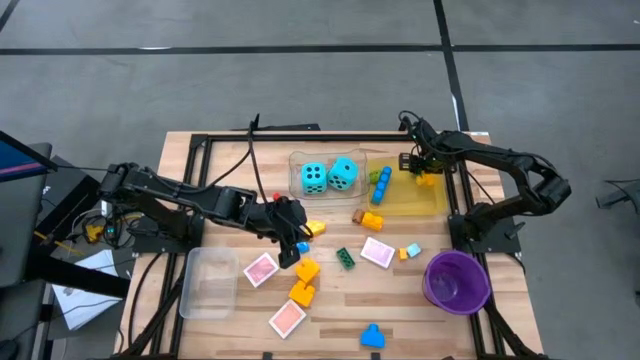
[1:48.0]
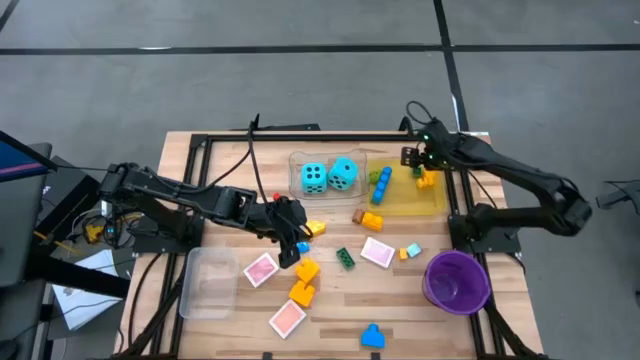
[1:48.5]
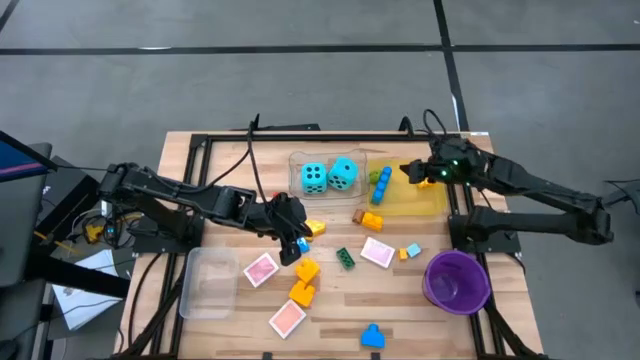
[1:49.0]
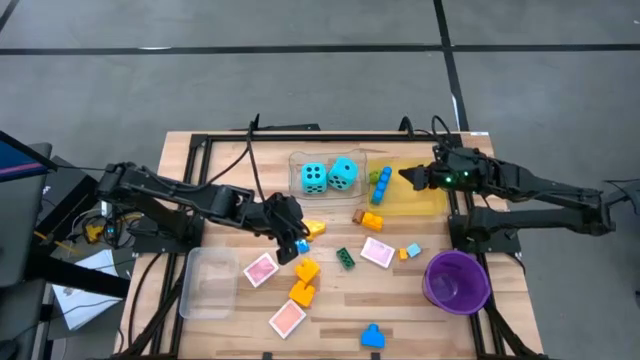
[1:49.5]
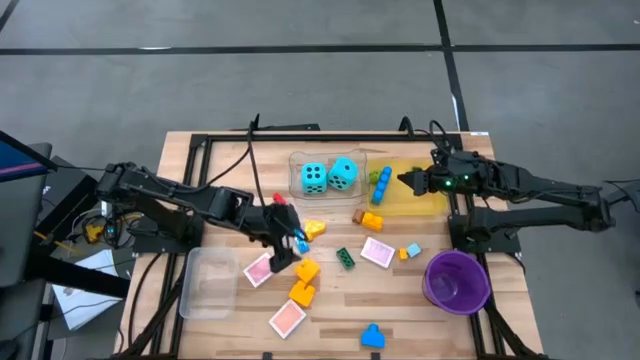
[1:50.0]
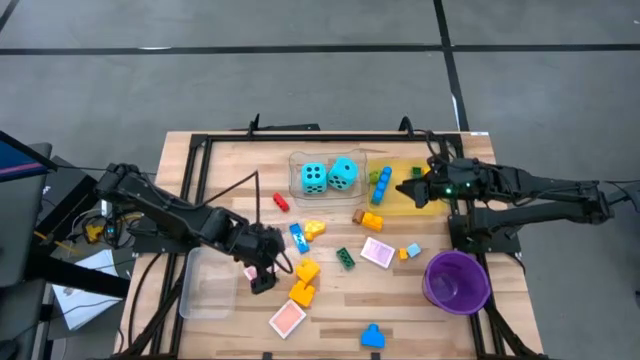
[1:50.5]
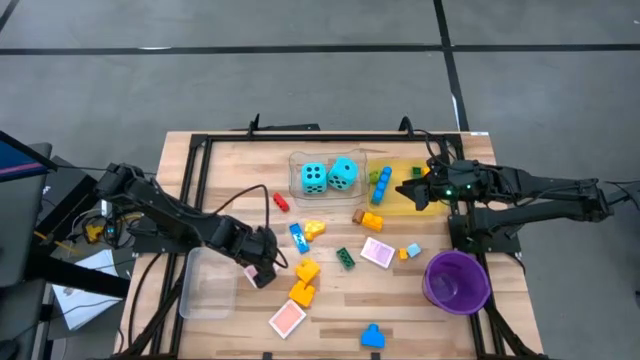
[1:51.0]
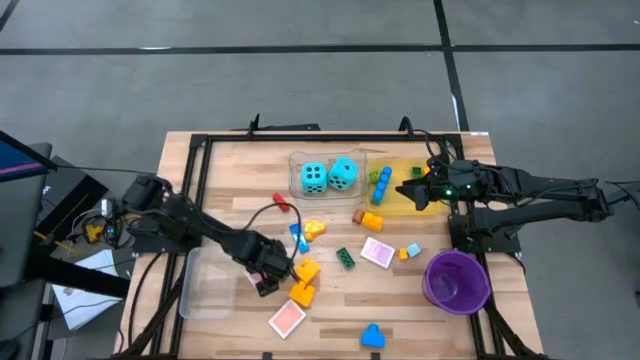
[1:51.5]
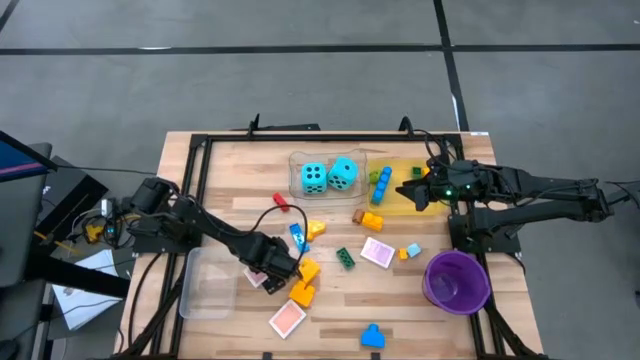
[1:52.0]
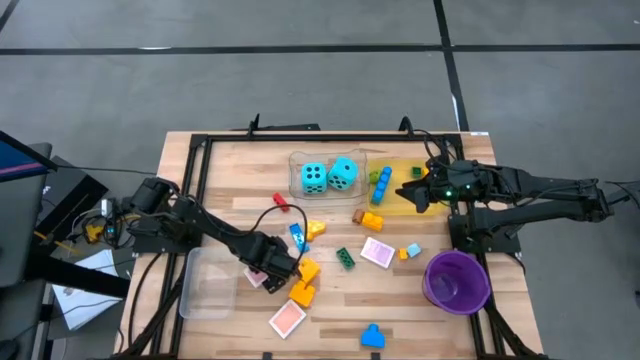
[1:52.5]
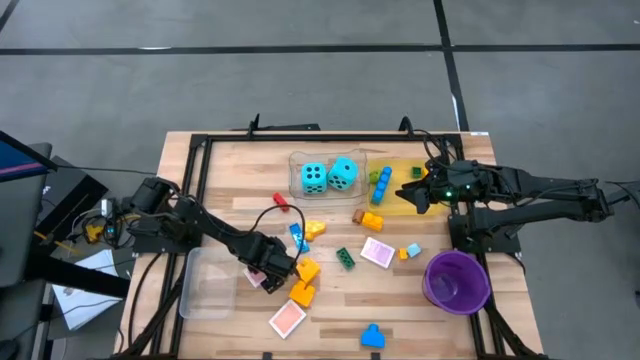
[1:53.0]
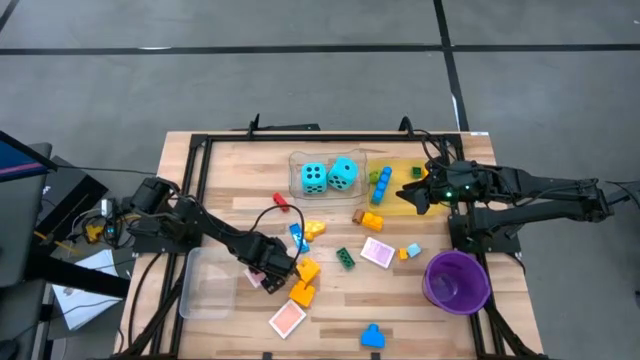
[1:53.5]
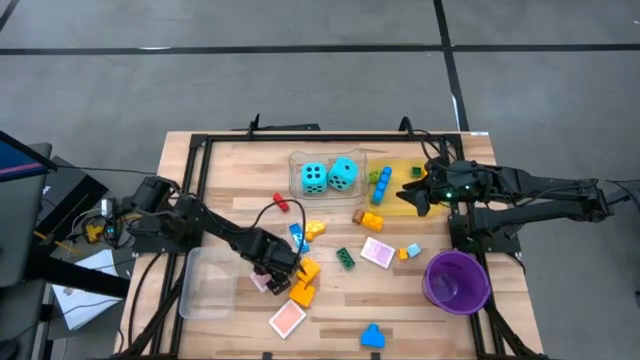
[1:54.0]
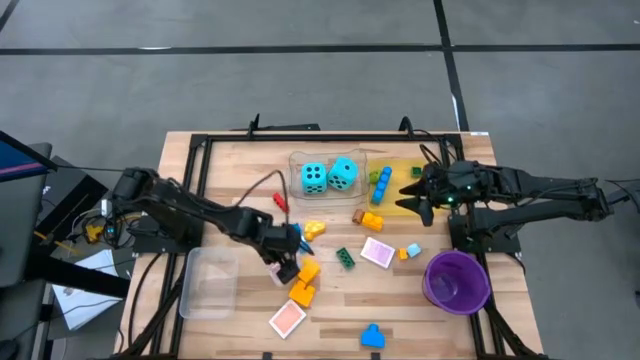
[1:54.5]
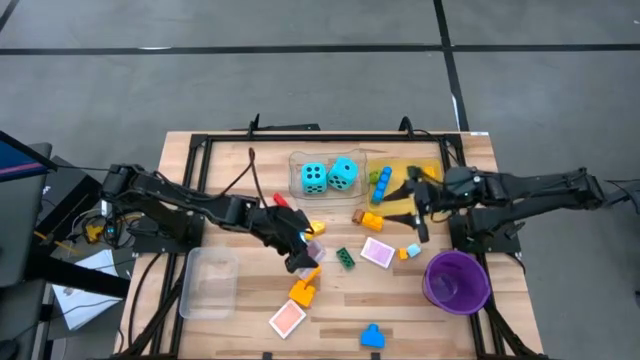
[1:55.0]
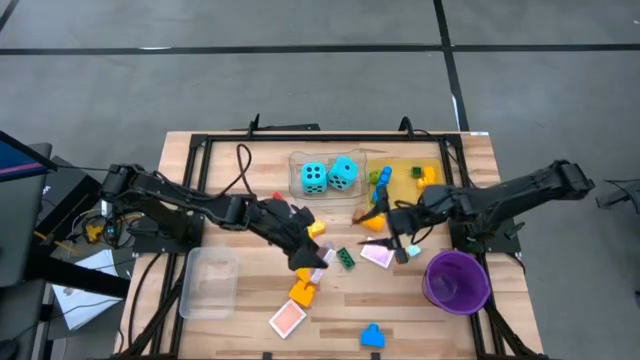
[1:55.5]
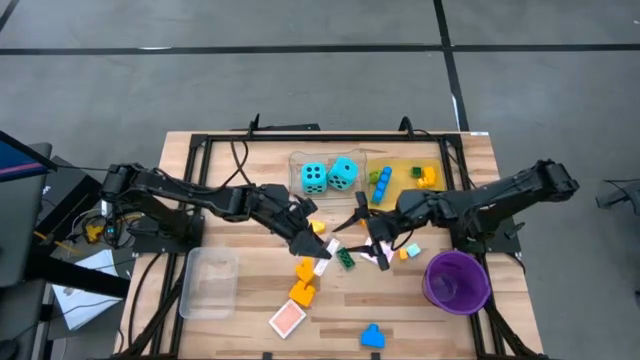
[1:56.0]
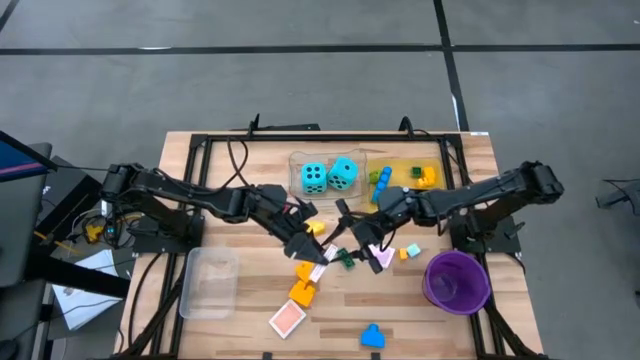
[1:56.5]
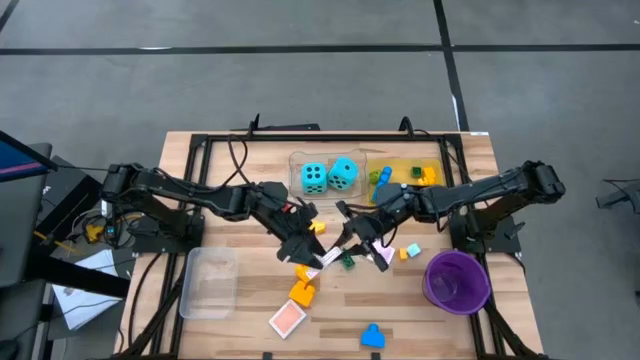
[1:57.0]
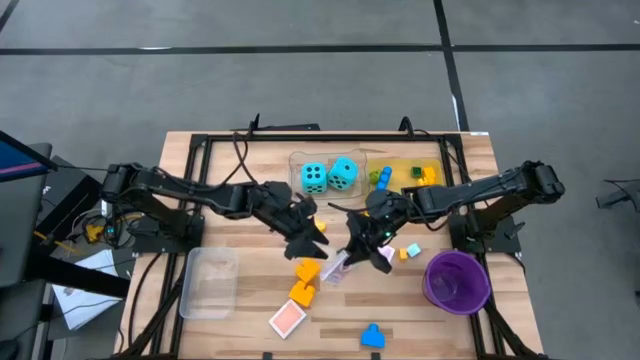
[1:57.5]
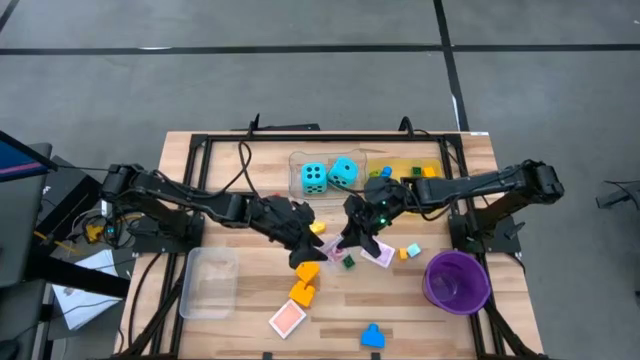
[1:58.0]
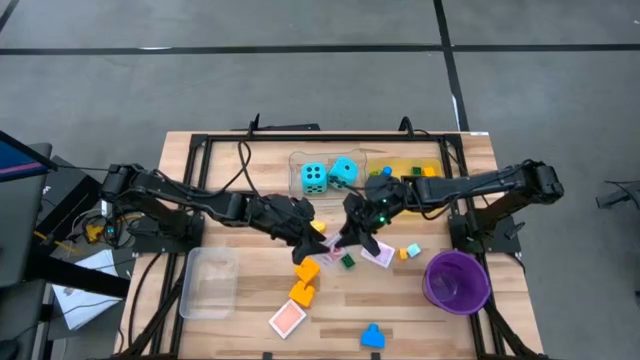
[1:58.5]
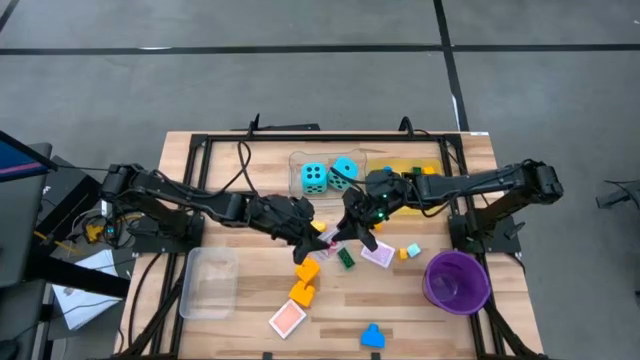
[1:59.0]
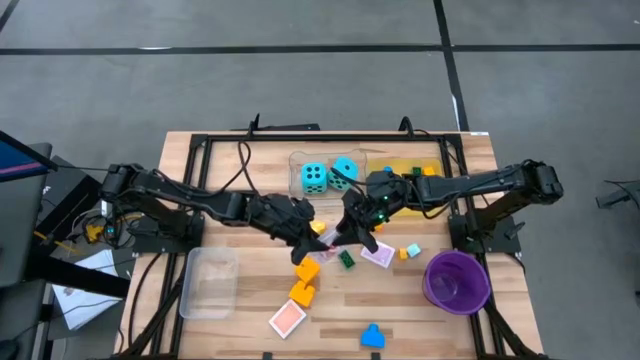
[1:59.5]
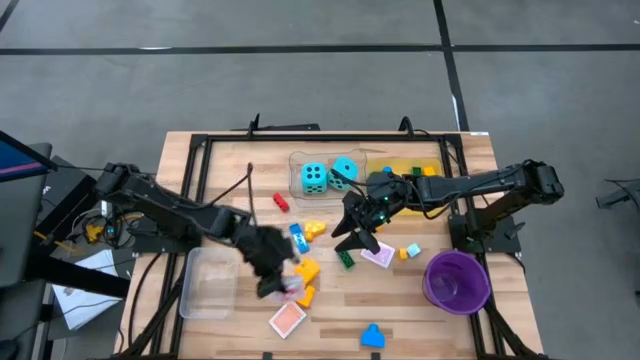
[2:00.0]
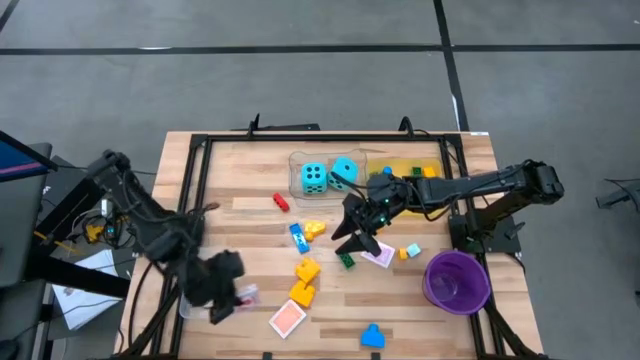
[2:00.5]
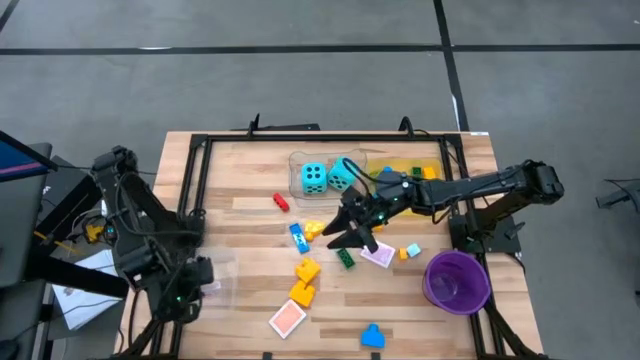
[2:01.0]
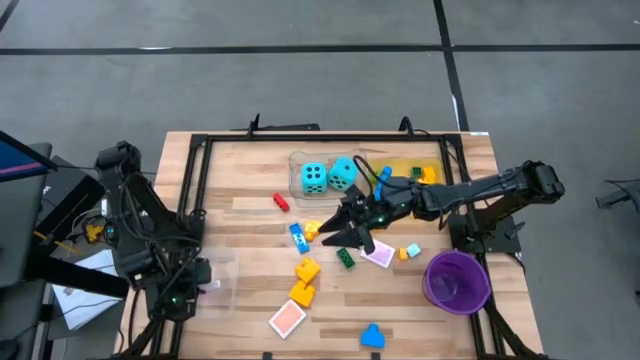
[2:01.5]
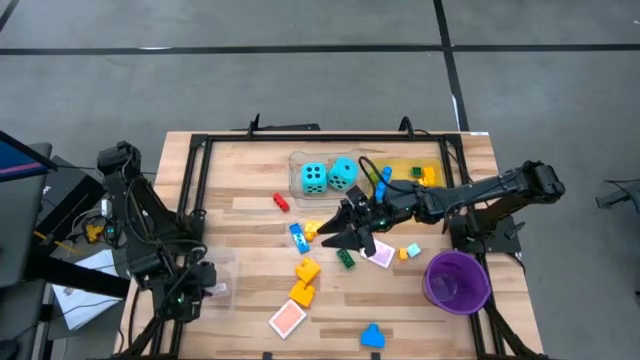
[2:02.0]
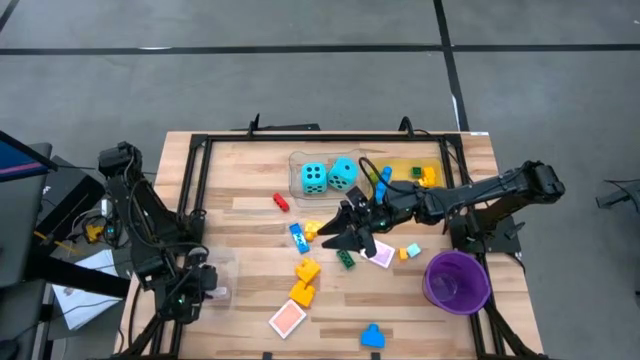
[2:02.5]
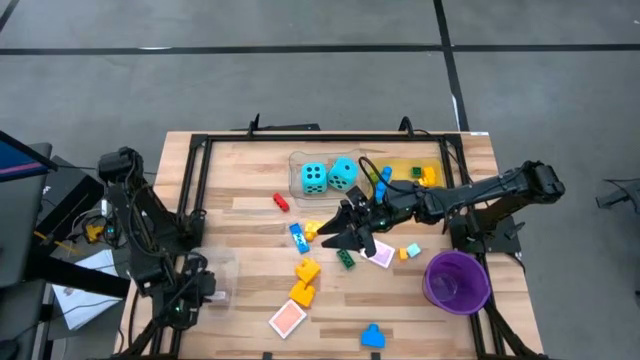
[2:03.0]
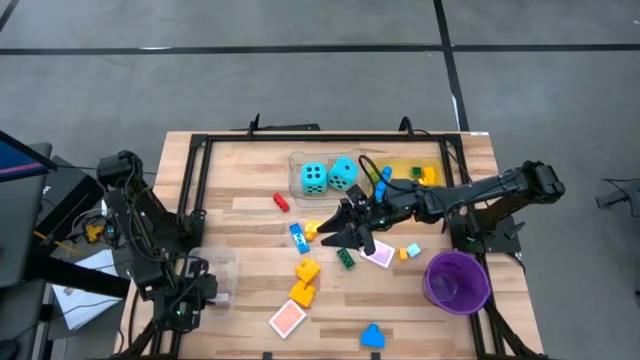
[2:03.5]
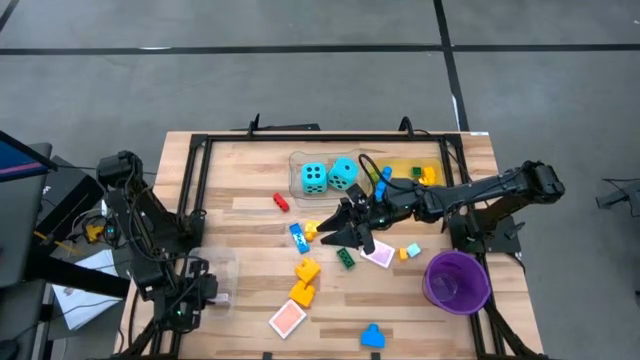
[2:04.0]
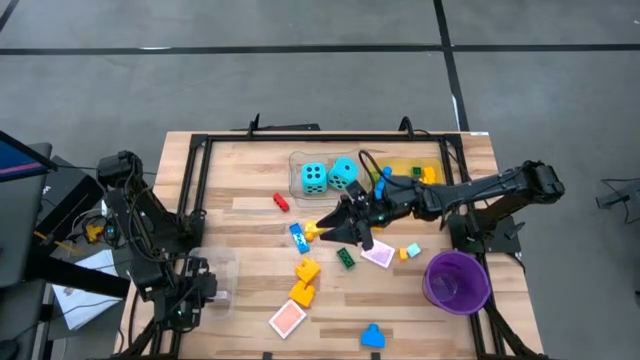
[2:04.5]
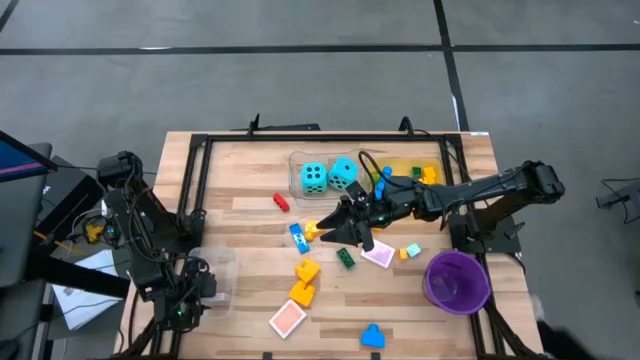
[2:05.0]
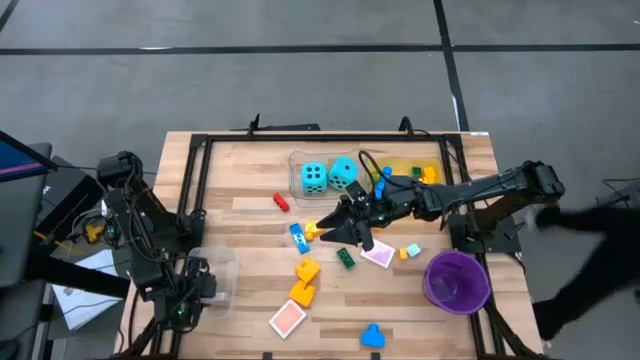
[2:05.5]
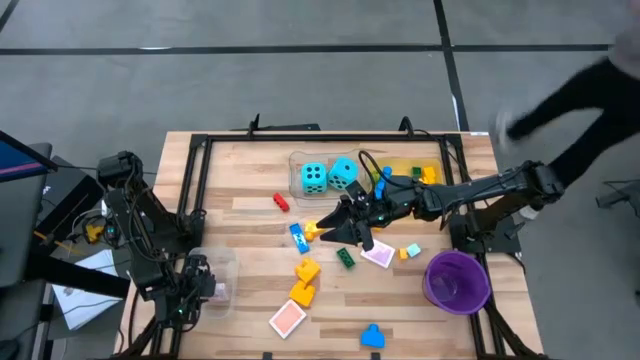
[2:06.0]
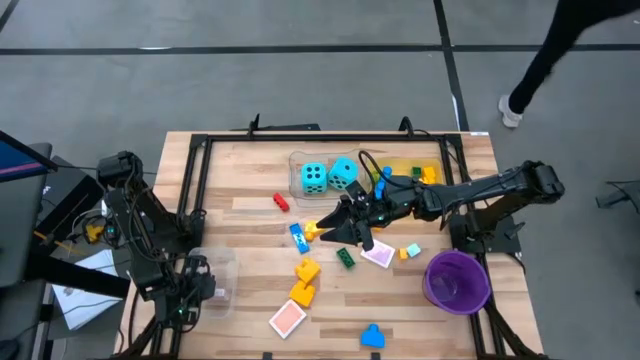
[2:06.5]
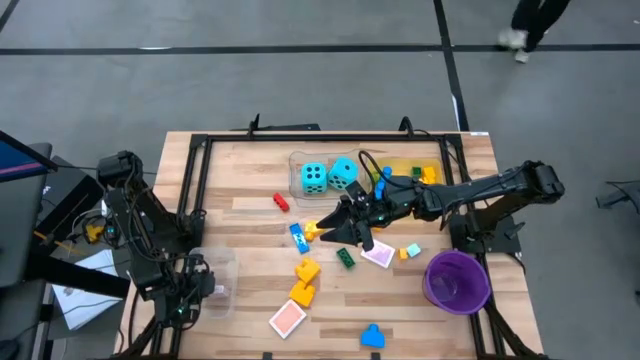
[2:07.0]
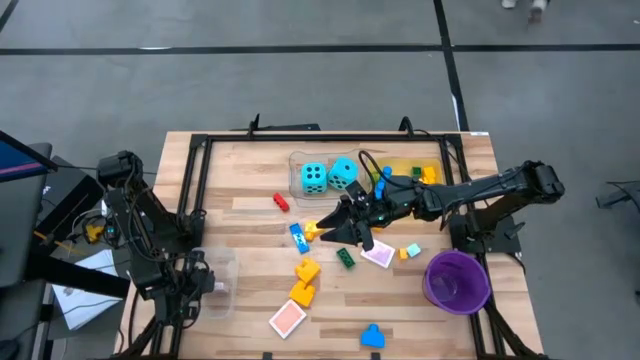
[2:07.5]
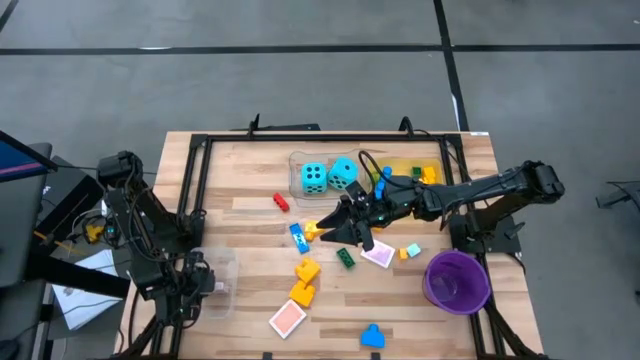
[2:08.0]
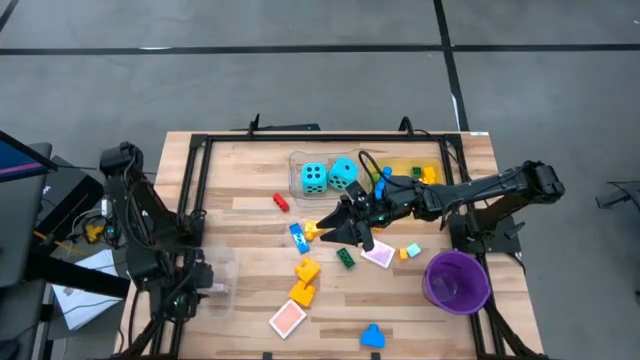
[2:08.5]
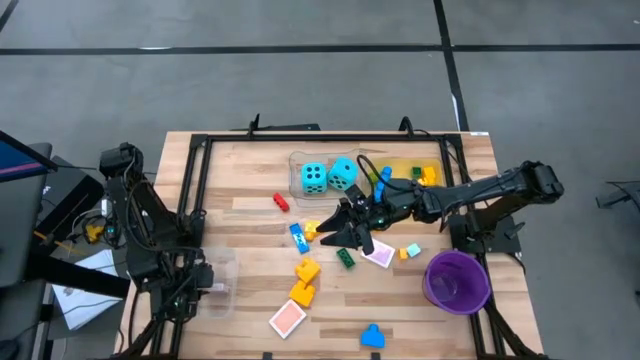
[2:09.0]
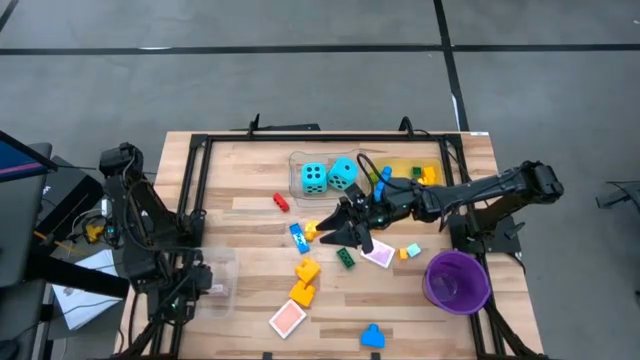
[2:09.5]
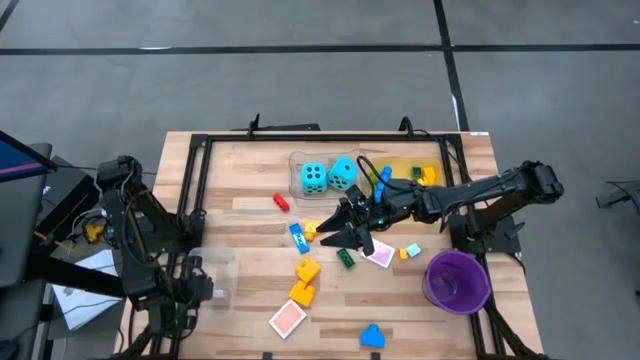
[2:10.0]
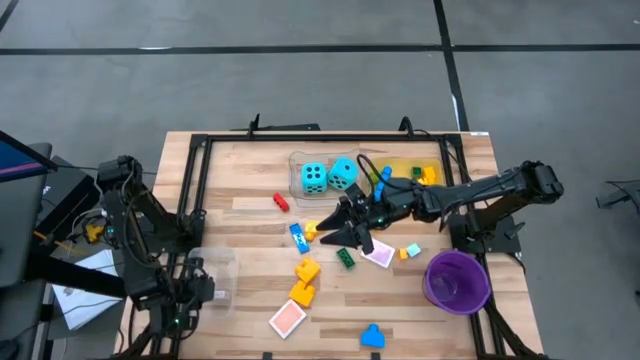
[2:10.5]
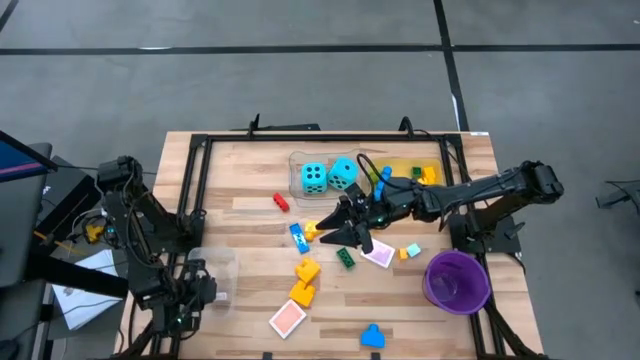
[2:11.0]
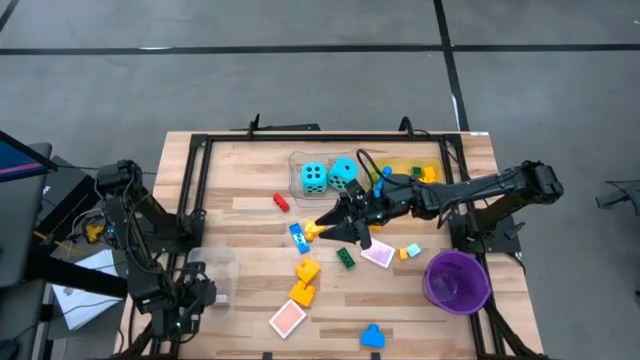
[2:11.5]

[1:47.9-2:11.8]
Task: Pick & Place Toys
Put the pink deck of cards into the white transparent bin
